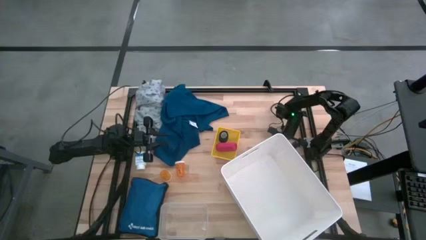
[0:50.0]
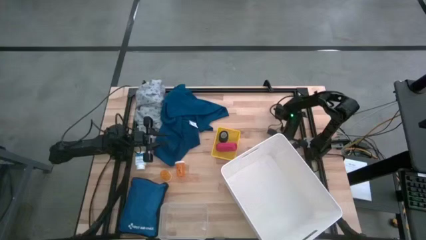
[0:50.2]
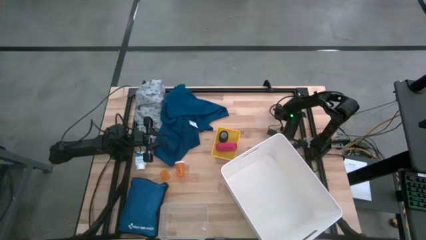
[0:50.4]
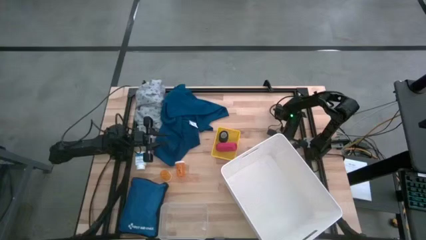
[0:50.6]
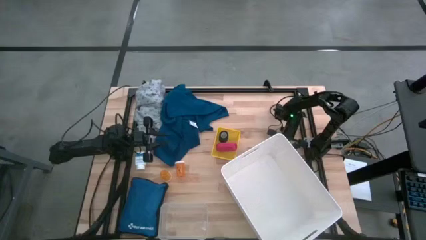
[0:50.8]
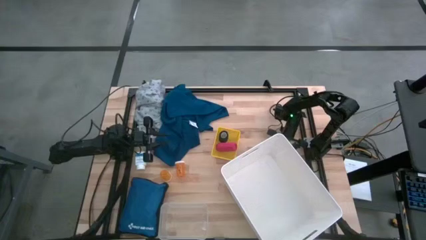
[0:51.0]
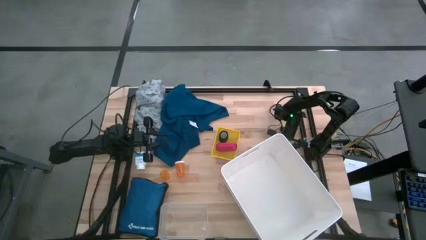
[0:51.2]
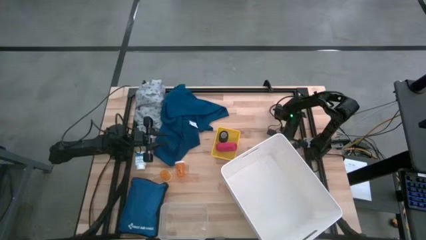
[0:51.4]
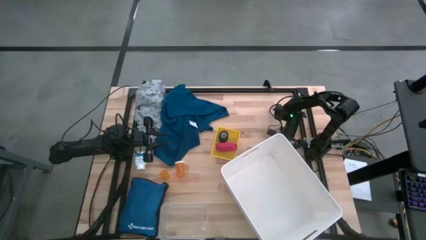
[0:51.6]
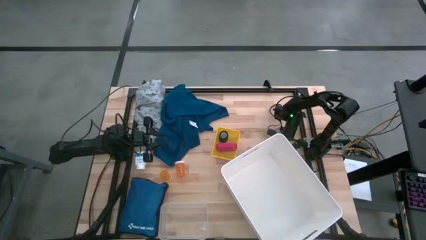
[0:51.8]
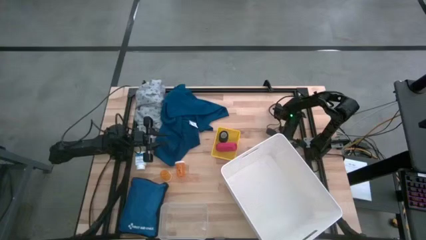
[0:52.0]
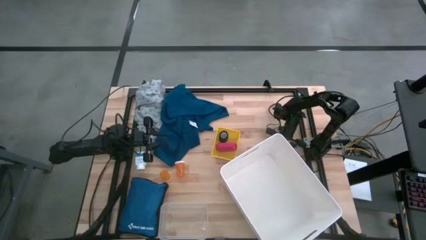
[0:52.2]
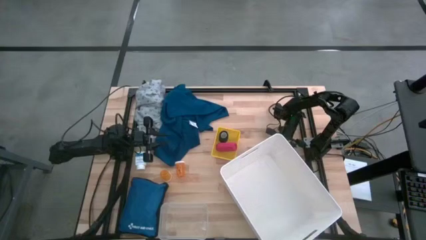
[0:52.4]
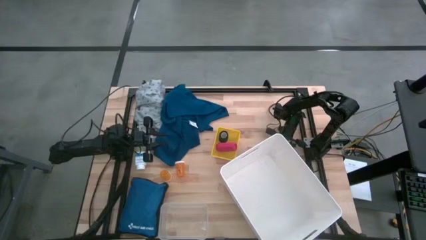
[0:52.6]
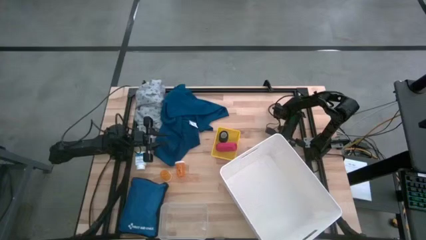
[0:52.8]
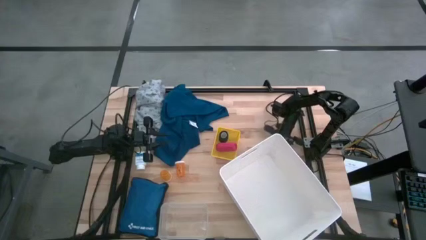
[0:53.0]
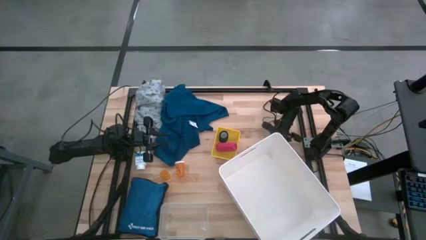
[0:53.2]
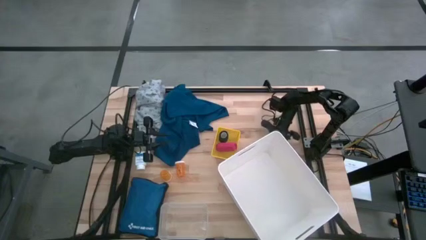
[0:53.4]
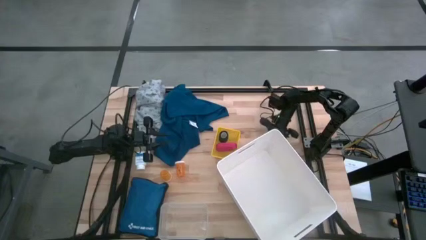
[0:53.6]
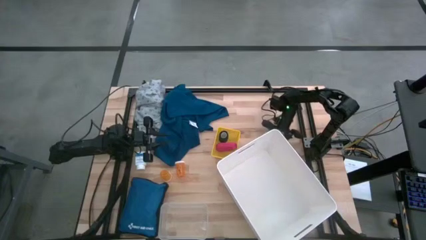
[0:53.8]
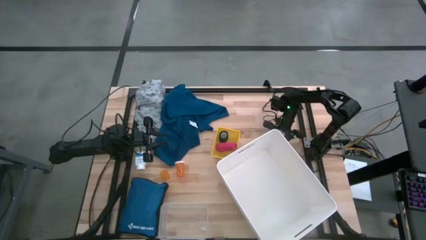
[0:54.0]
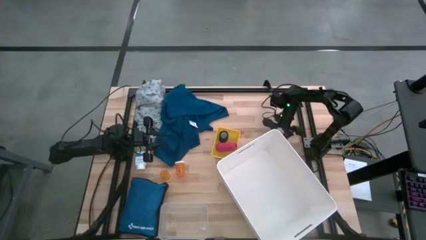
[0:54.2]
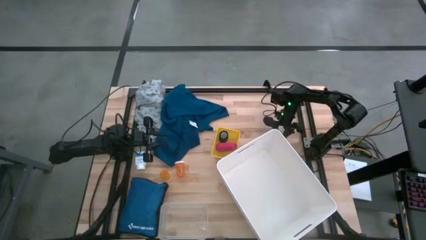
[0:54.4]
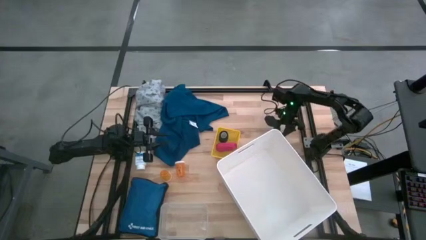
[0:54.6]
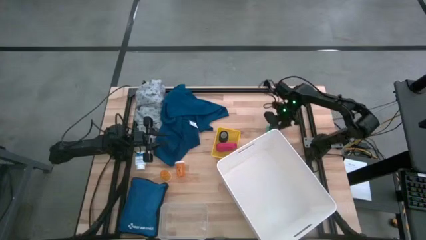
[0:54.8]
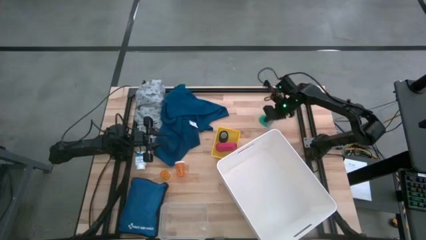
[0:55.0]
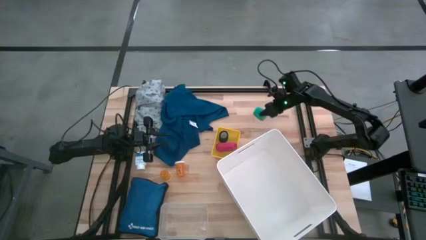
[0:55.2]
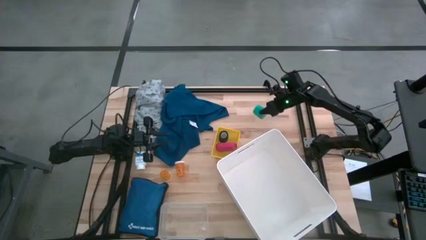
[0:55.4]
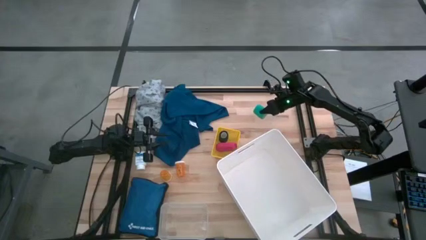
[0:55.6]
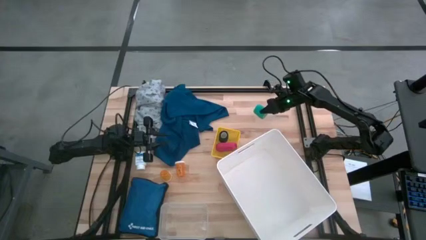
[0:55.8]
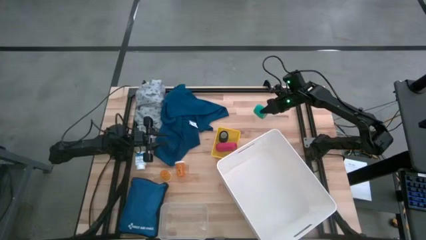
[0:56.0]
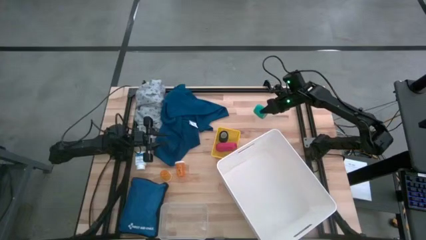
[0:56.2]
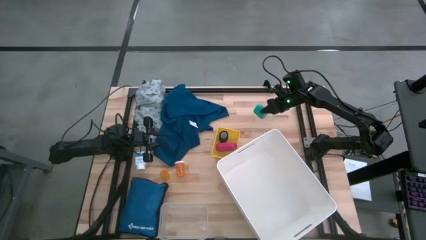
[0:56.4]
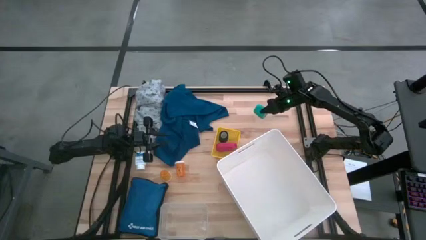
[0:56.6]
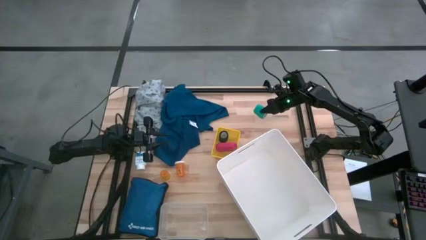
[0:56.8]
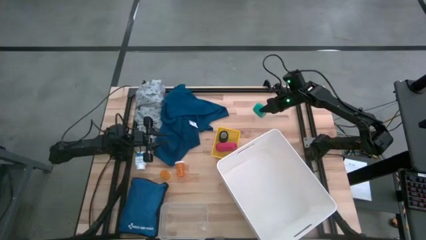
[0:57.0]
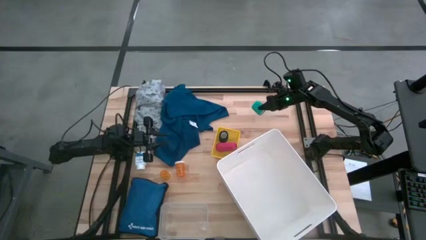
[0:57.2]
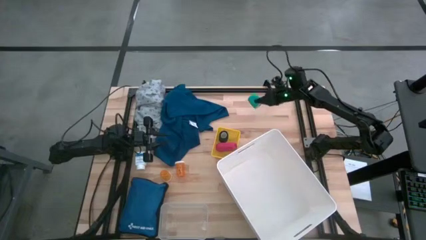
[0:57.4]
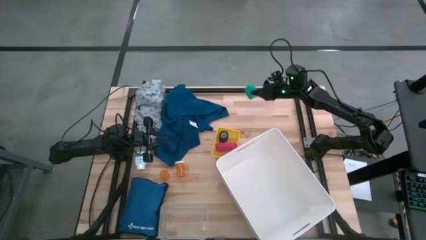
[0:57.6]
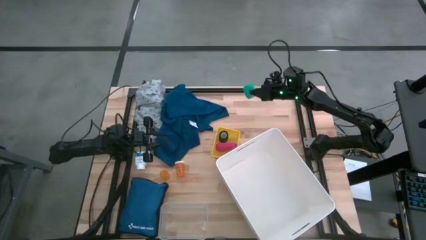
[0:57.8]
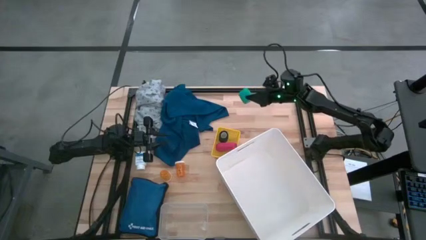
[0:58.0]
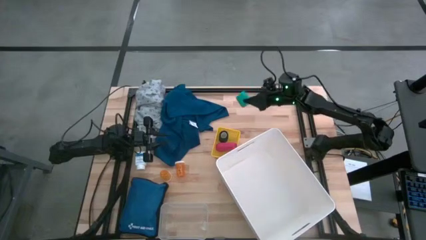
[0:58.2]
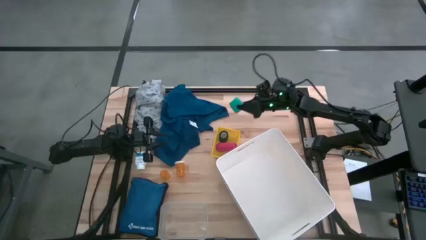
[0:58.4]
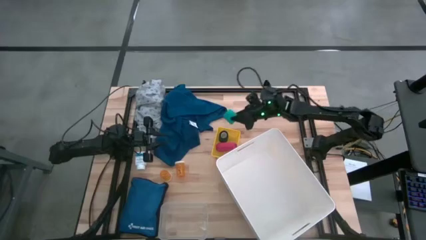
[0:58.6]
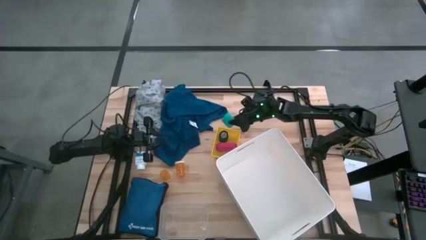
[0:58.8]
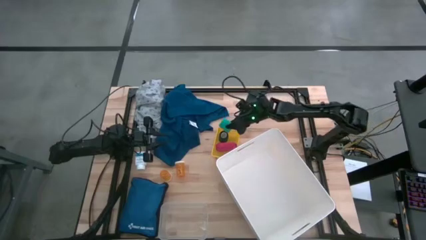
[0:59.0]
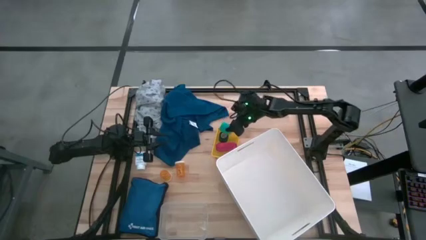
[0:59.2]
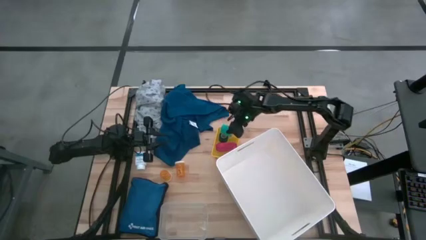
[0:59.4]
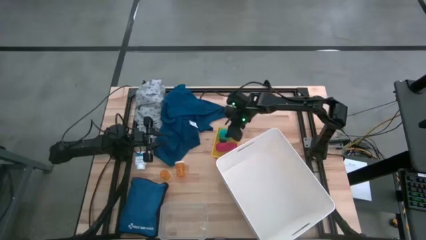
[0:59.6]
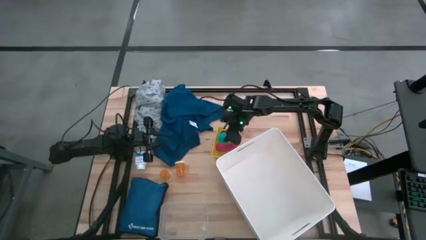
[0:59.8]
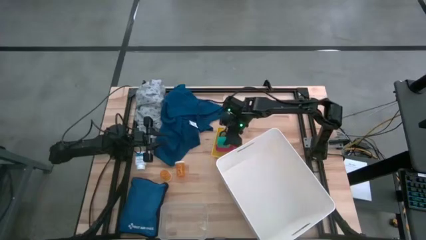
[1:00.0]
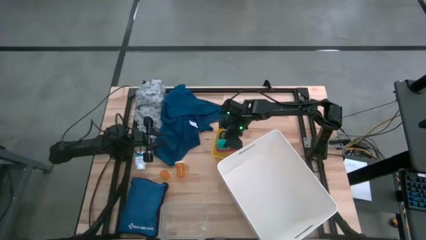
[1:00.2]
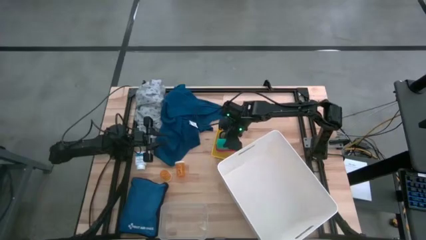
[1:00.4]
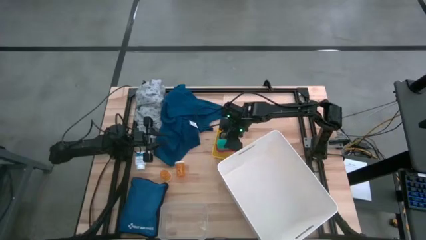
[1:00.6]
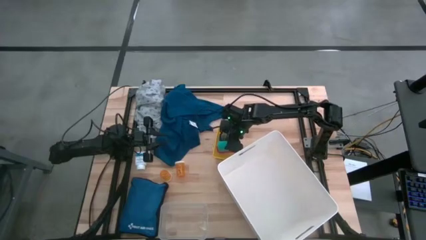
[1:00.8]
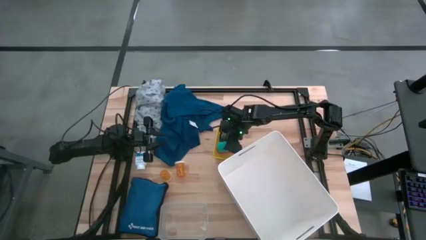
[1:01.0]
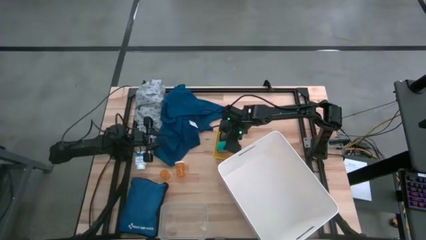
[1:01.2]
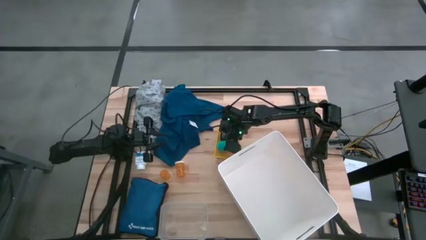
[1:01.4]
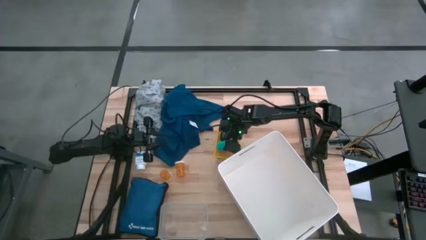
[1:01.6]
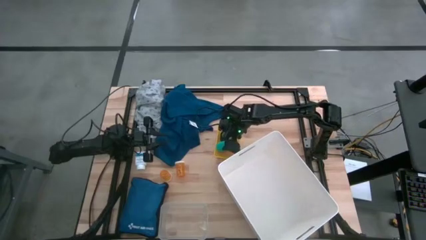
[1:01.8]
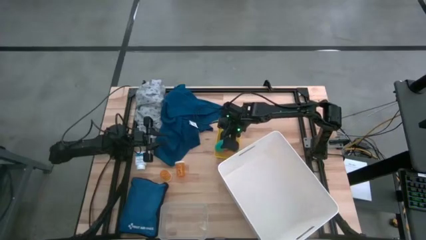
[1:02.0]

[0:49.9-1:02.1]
Task: Pick & place medical supplies in basket/bin
Put the light blue bandage into the yellow bin

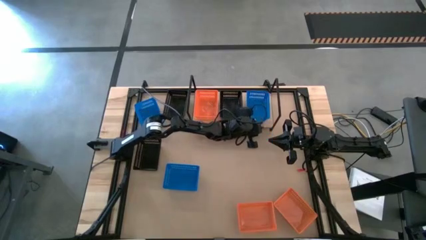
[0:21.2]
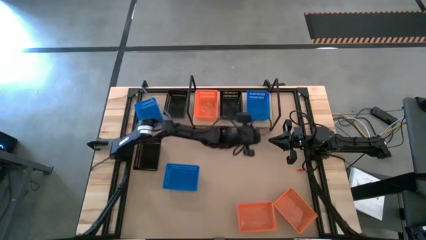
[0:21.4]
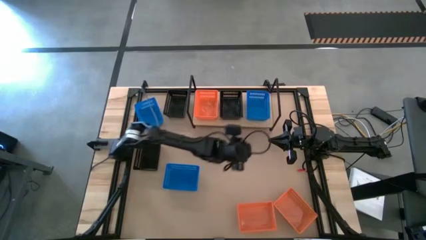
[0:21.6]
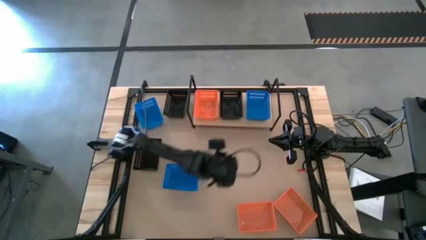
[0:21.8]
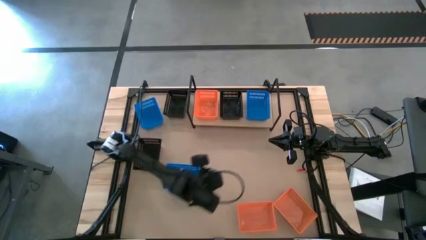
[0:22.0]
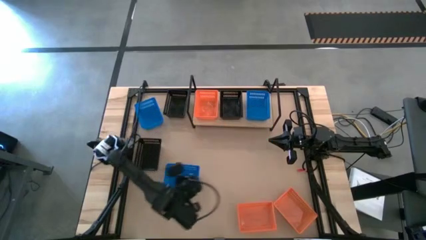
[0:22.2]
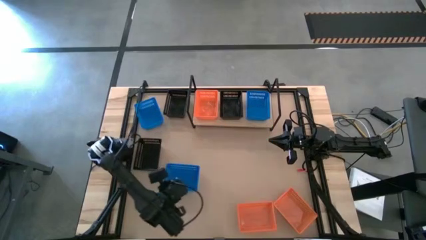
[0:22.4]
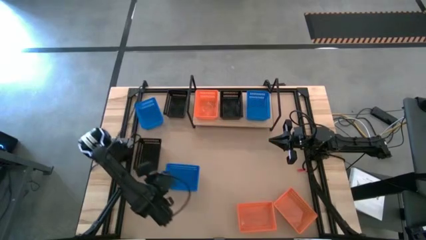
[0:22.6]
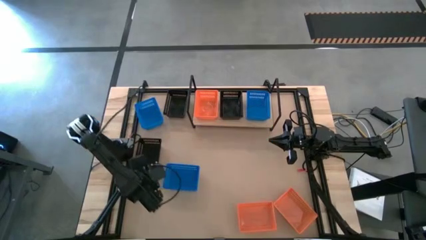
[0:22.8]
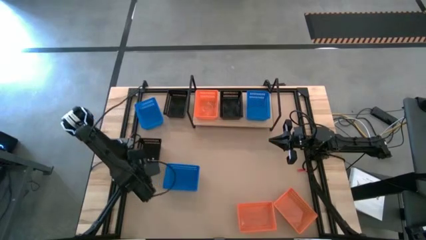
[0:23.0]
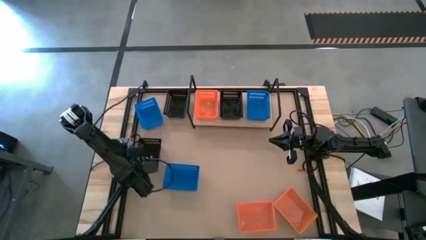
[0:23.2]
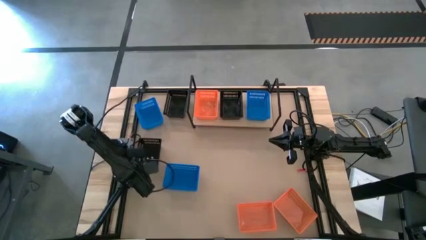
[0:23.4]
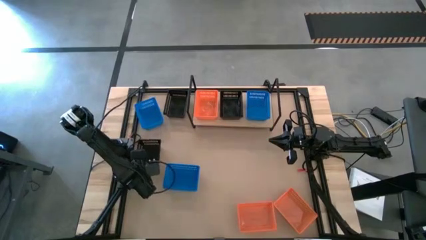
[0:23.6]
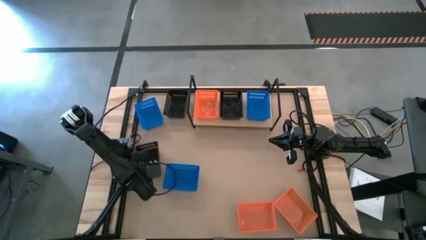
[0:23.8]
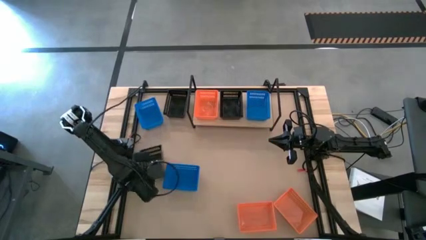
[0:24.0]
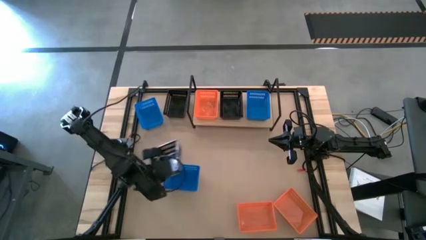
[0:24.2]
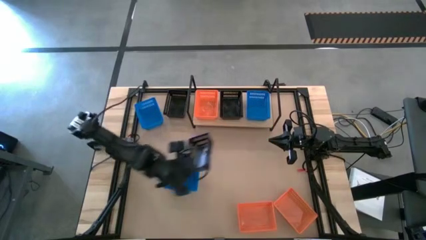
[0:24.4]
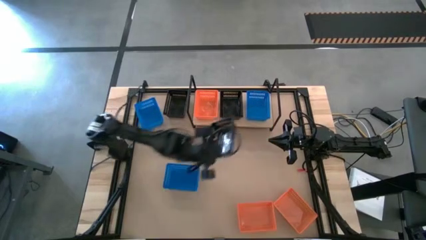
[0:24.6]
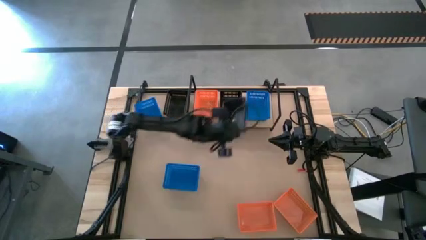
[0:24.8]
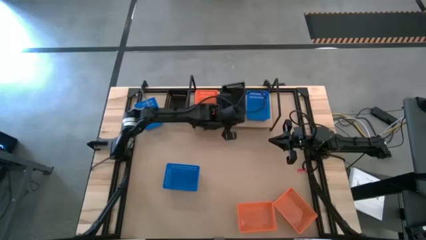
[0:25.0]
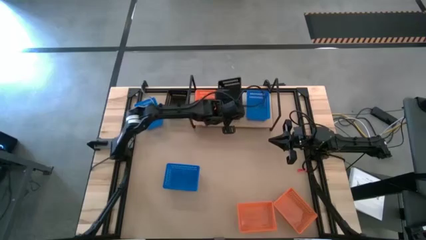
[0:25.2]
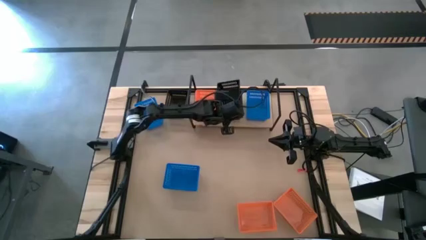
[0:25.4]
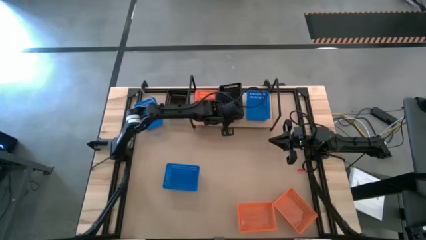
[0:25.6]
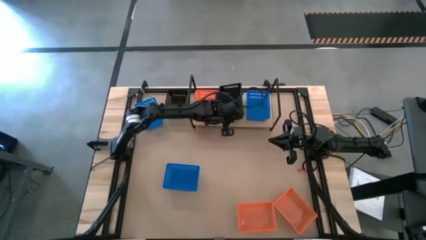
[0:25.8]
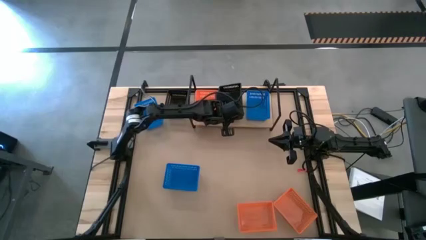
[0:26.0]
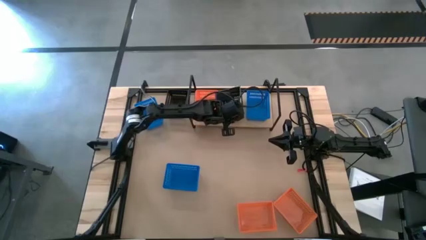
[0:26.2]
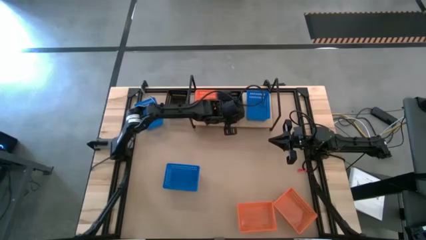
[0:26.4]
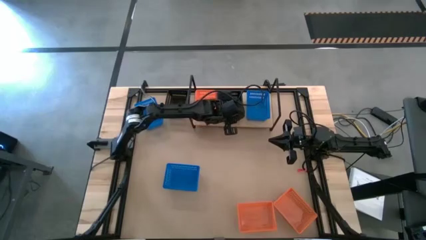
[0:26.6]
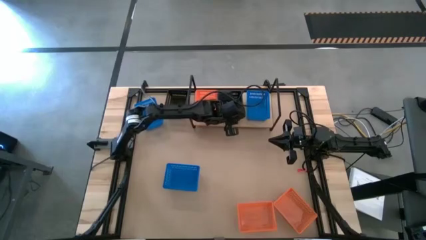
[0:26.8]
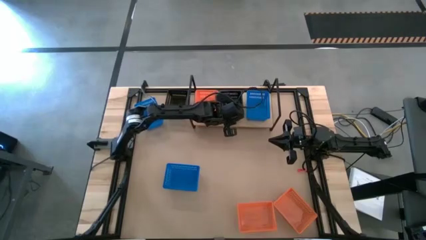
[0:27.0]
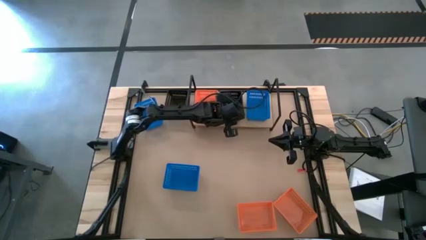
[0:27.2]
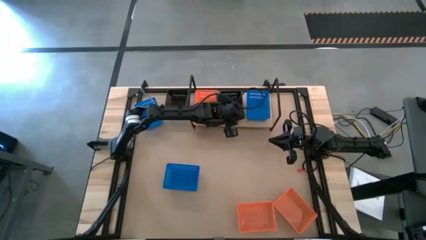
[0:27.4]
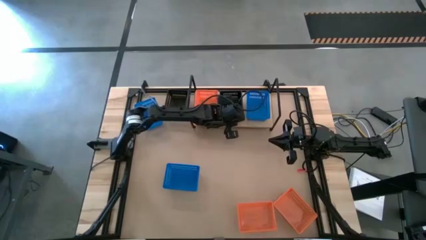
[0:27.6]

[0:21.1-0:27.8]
Task: Stack baskets on shelf by color
Stack the bottom black bin on the black bin on the shelf
